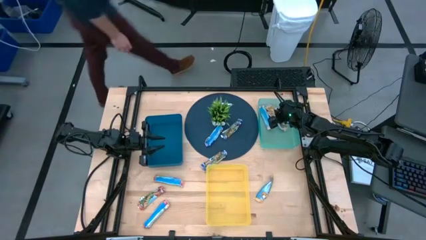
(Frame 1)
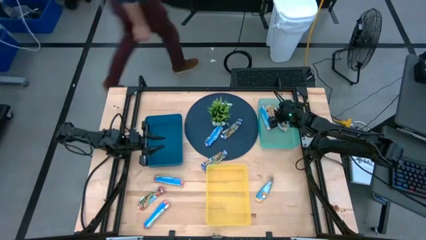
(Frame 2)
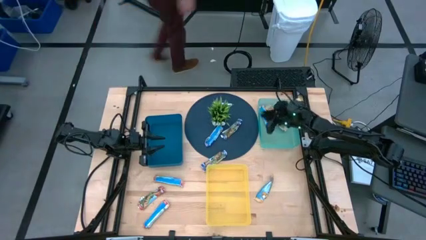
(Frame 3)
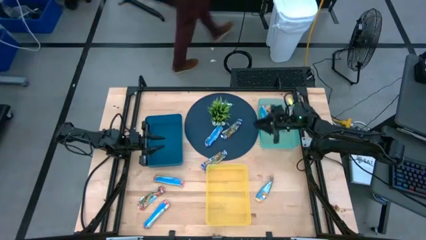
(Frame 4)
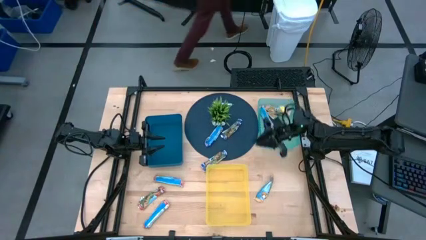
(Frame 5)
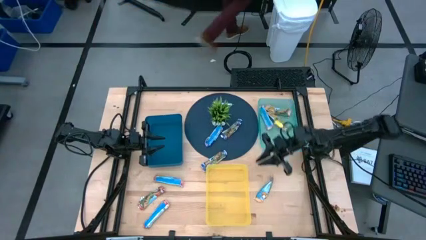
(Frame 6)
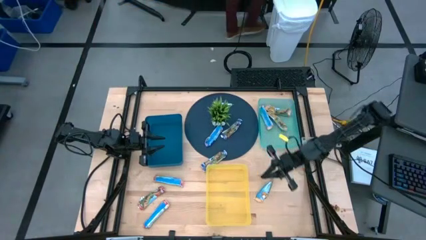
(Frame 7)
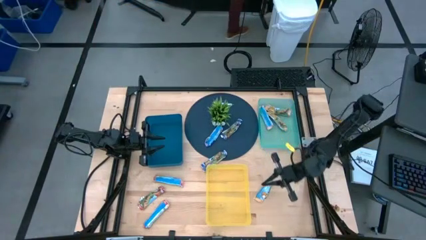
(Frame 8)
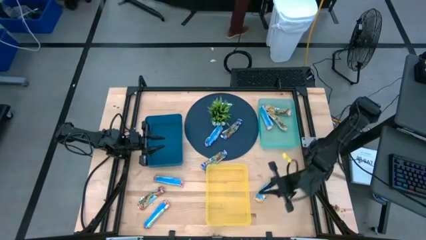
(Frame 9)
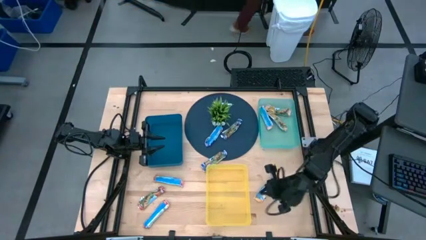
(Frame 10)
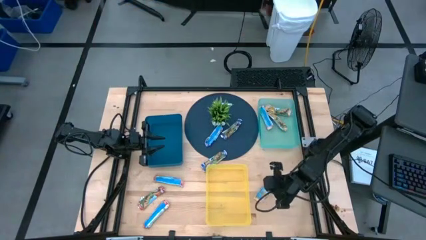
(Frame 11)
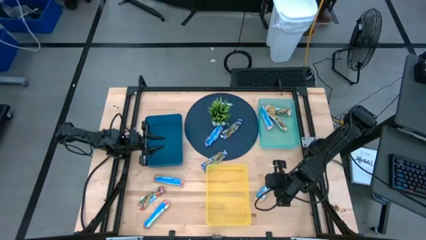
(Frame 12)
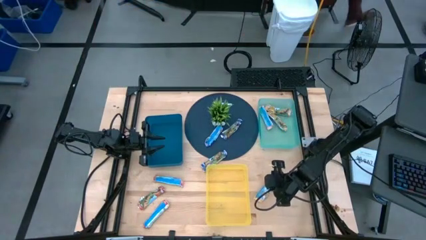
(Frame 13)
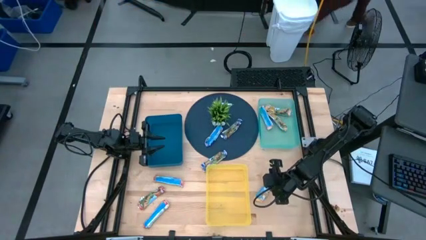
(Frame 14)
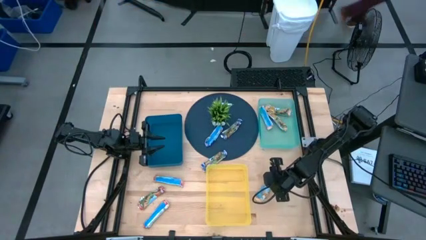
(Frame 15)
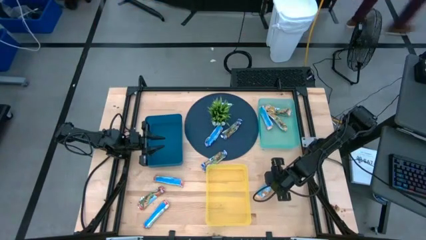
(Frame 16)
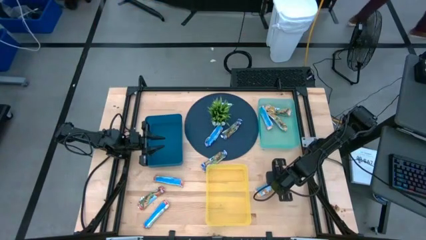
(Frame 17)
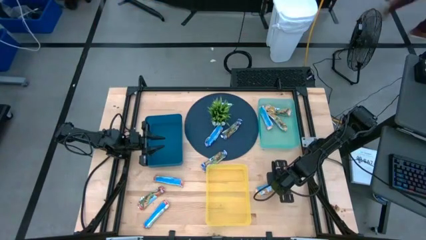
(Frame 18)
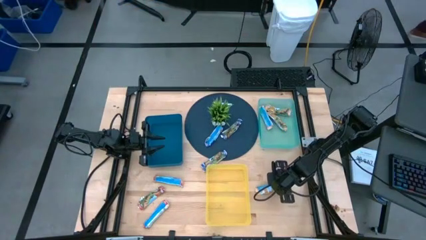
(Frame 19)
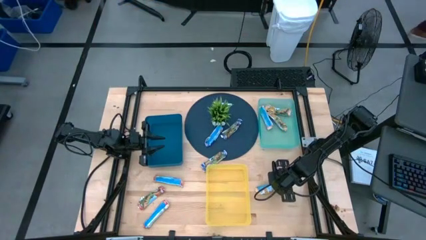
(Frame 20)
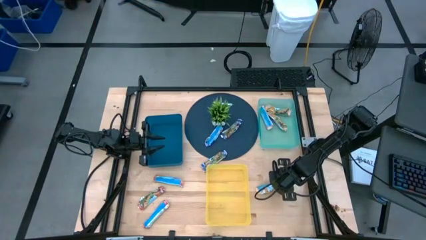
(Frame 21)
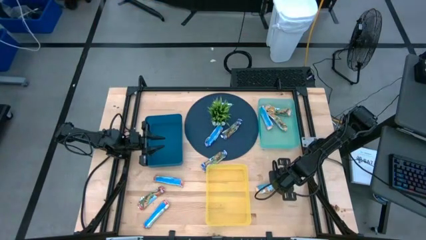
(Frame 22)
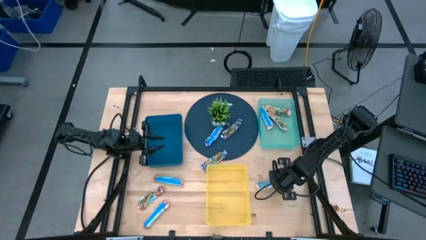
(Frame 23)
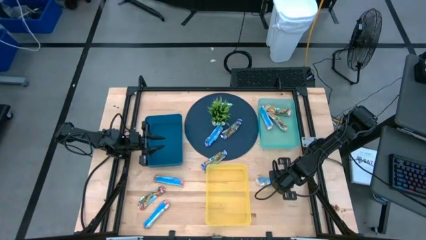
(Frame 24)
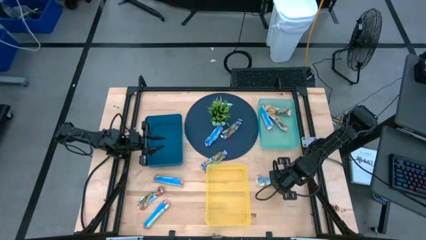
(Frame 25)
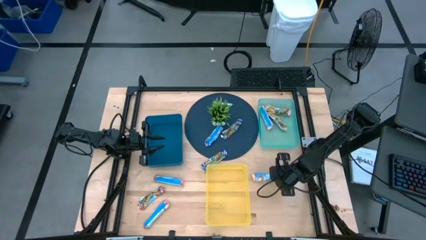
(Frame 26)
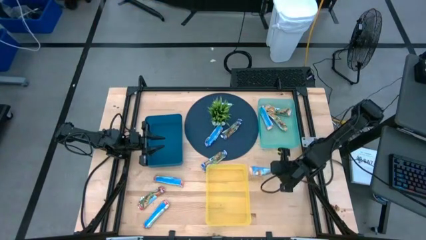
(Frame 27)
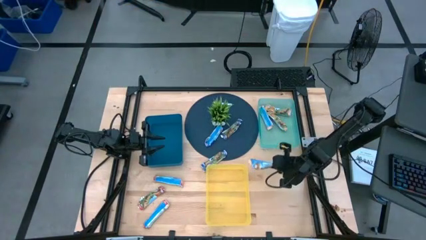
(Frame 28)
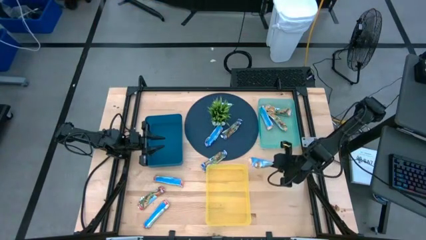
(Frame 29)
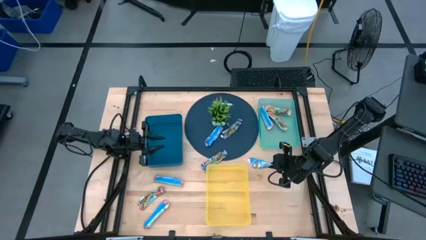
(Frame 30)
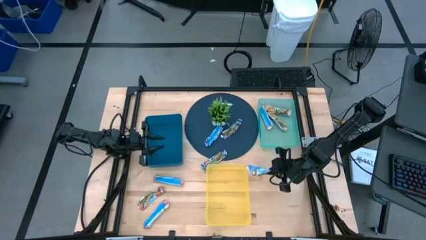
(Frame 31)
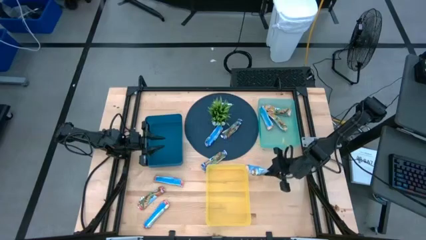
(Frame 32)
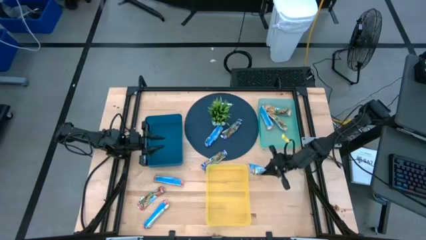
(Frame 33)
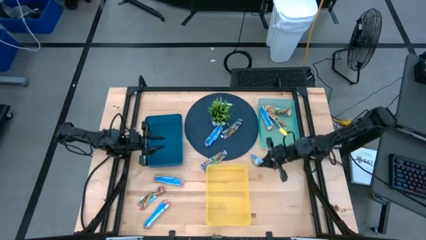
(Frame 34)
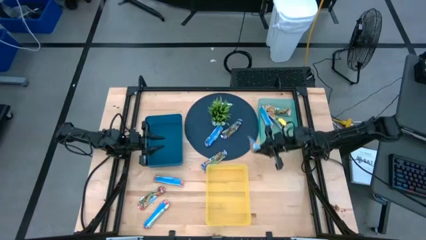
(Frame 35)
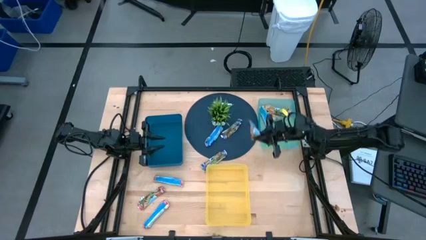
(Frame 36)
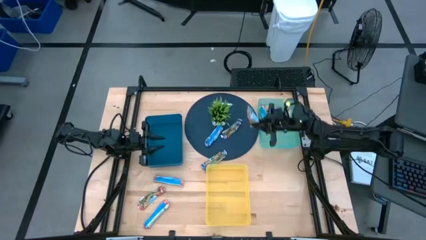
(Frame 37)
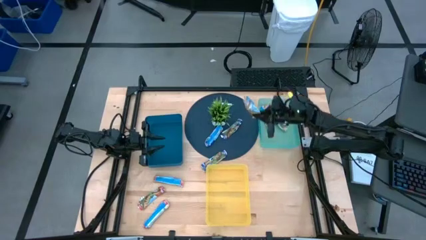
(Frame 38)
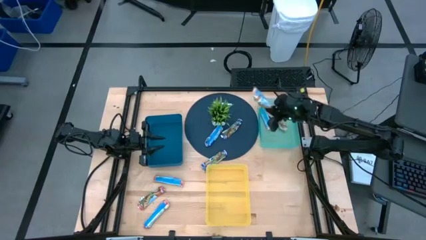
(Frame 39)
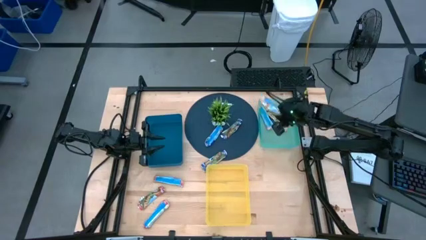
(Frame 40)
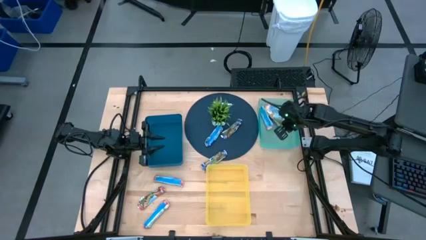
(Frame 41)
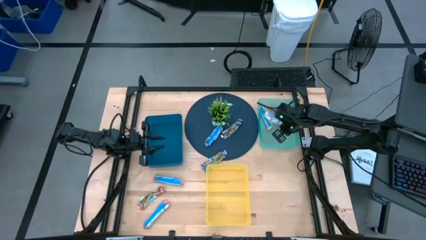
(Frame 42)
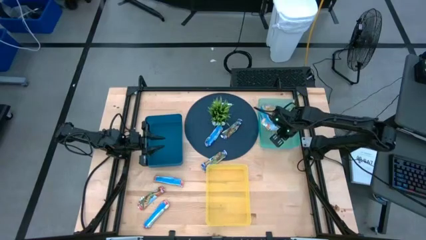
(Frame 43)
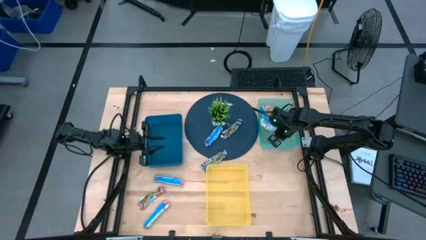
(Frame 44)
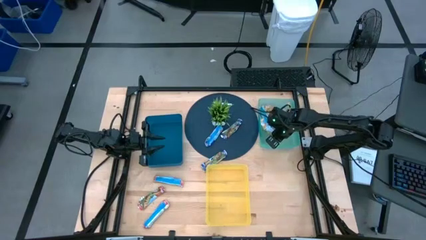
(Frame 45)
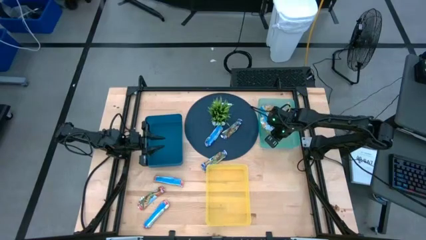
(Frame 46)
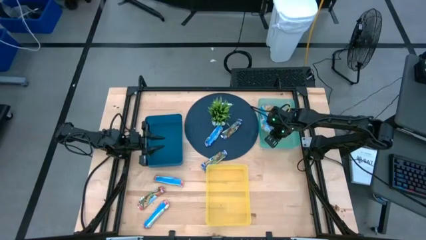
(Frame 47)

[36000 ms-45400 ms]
Task: Pick and place Granola Bars by type
Put the yellow granola bar into the green bin
